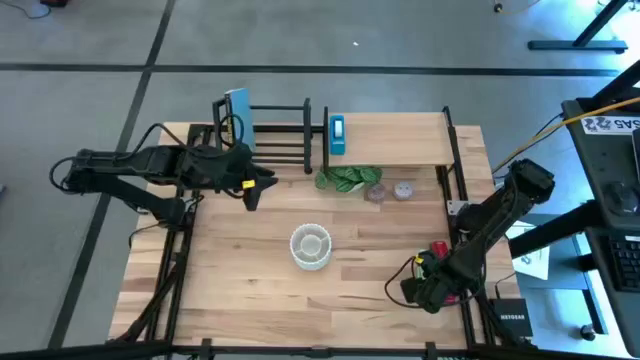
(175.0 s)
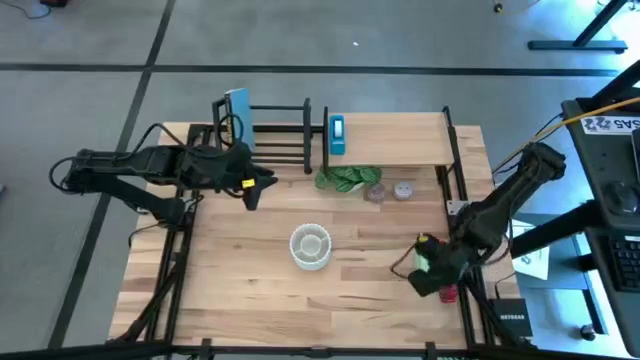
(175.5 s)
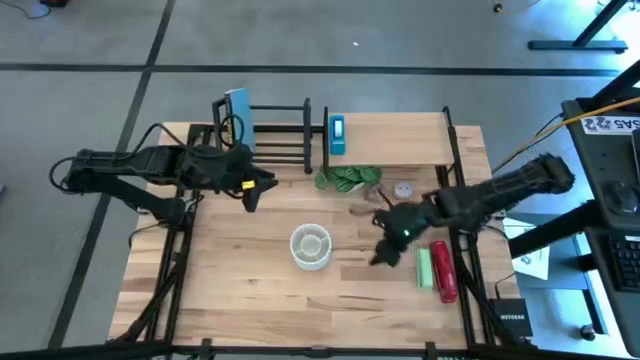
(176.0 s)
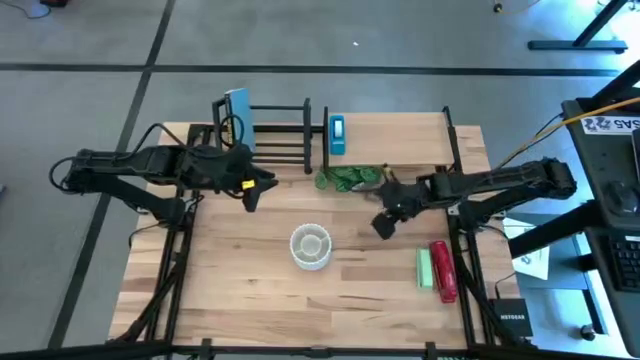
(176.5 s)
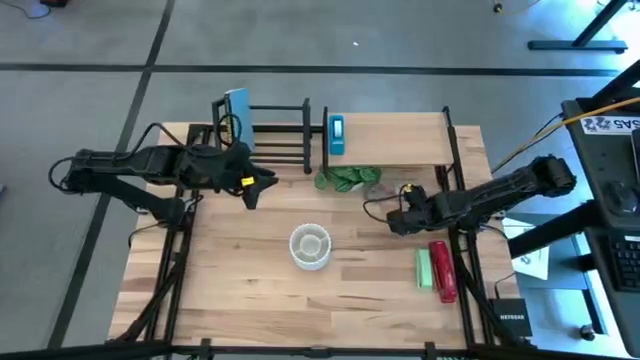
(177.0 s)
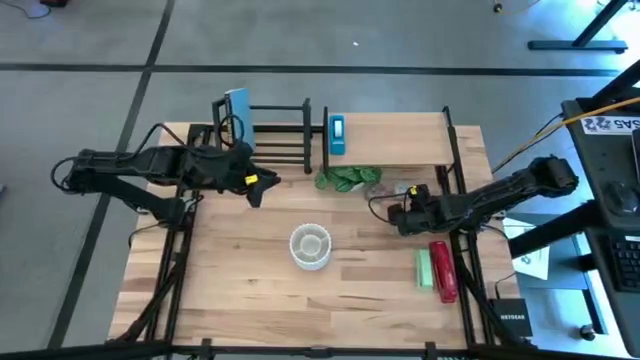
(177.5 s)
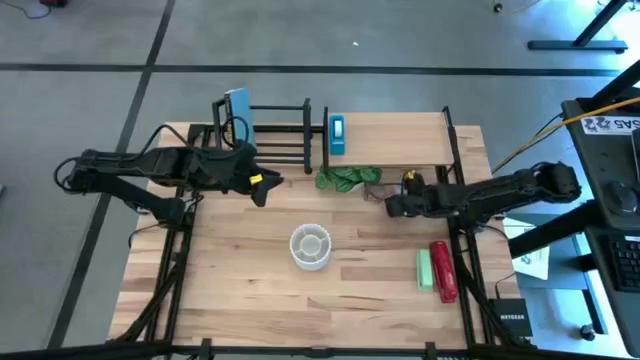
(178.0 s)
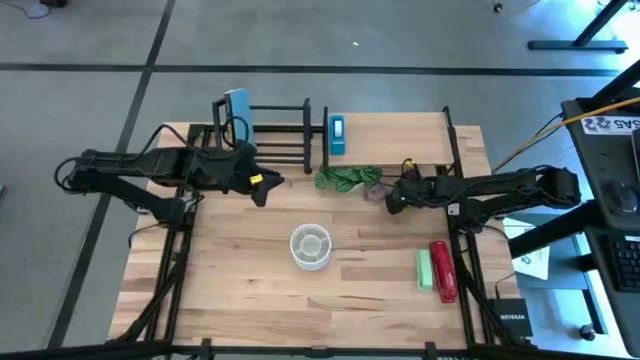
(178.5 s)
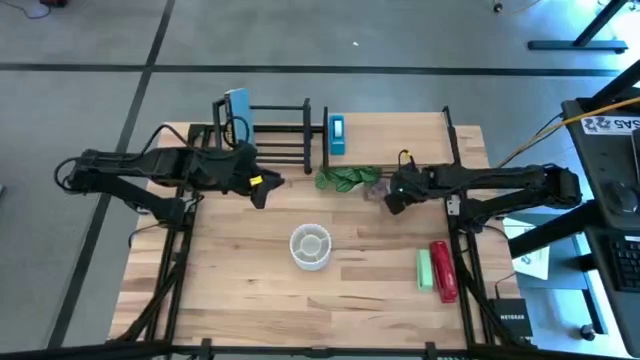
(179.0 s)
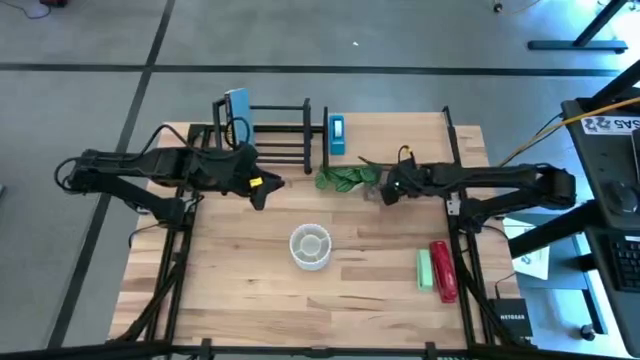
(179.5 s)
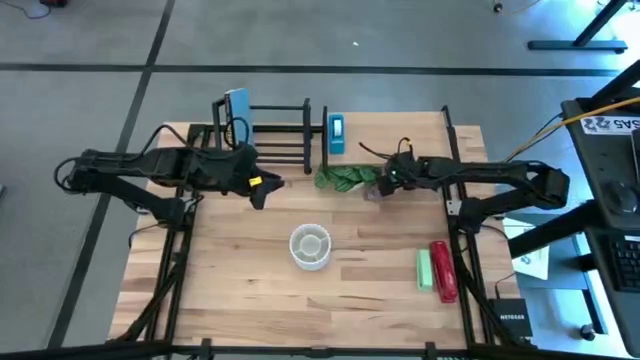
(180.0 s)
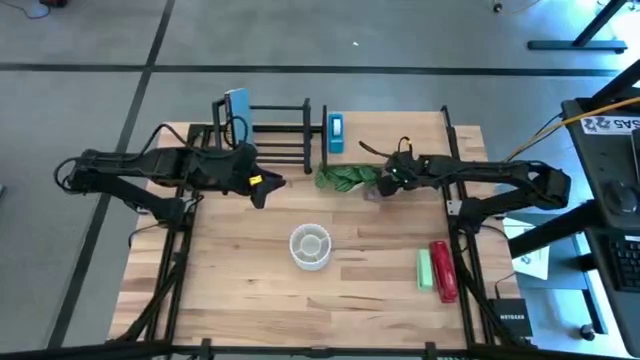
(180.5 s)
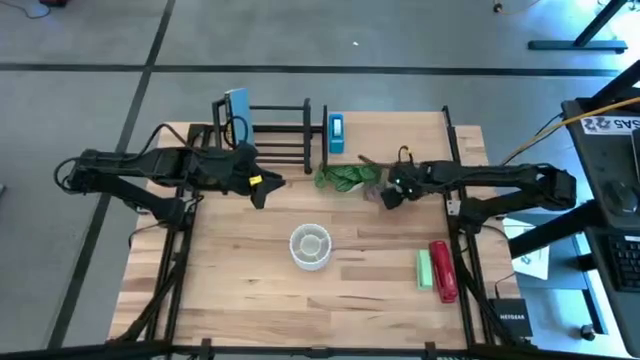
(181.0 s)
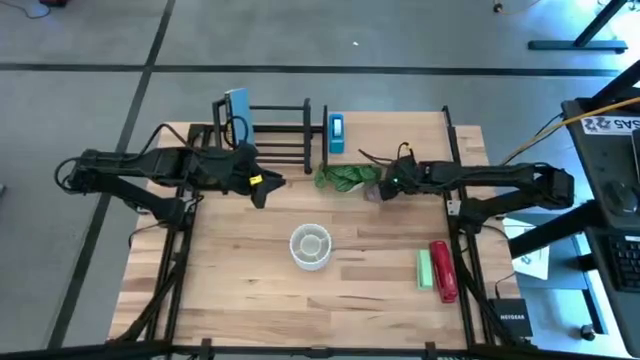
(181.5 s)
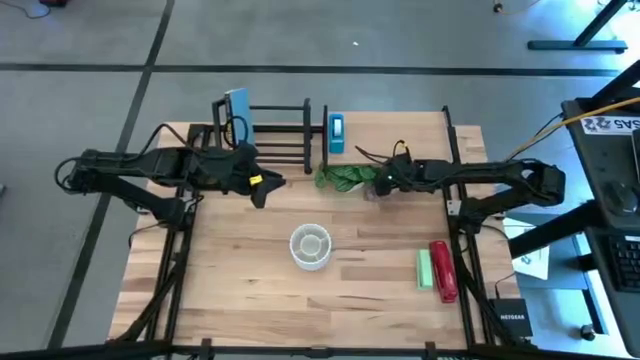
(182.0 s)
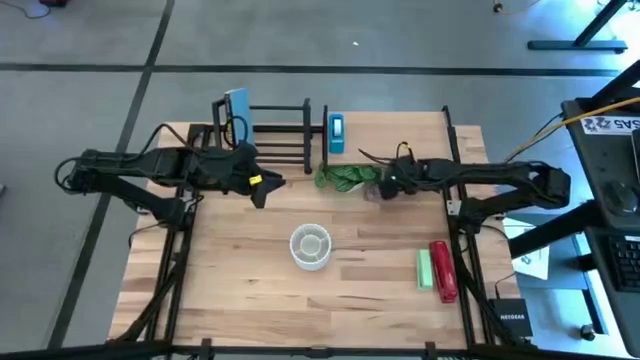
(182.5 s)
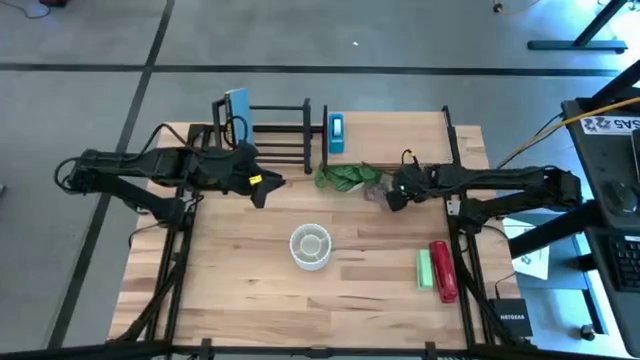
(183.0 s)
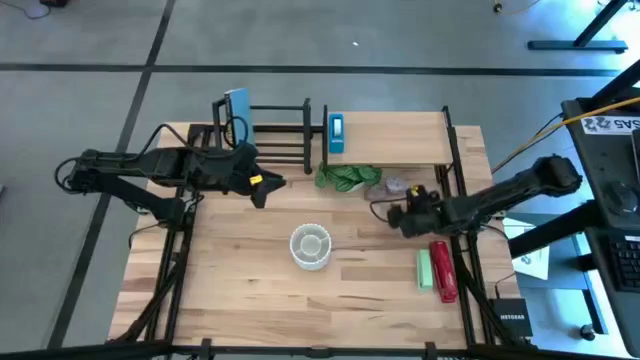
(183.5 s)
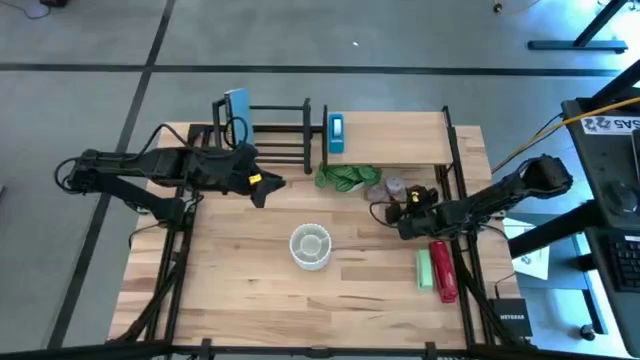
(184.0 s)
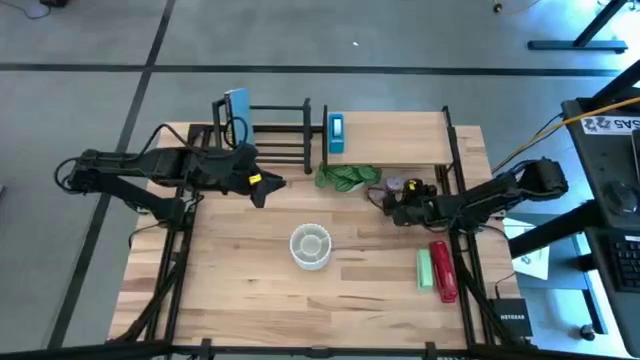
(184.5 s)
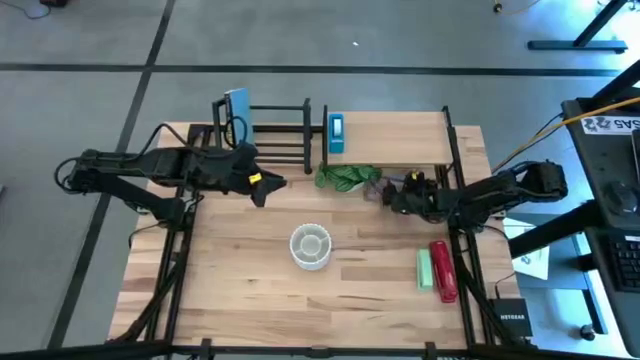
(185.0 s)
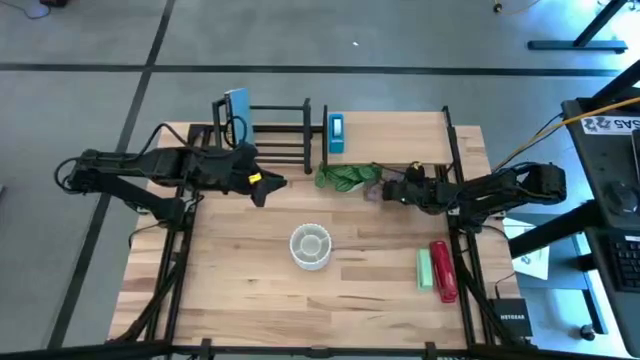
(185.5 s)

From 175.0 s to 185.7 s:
Task: Stock shelves
Remove the white patterned scented candle from under the shelf

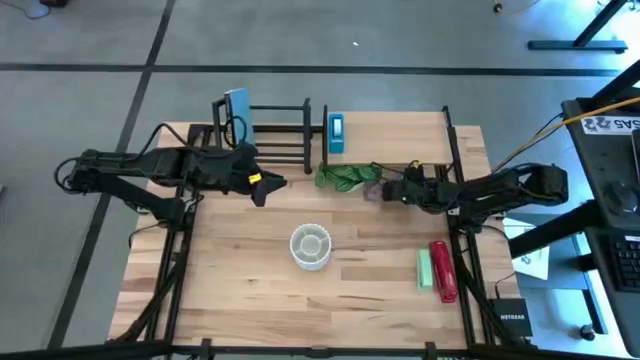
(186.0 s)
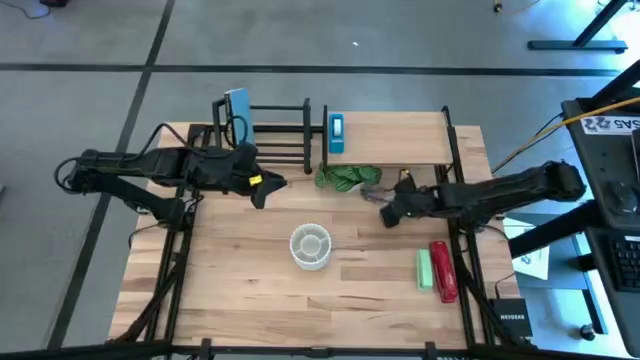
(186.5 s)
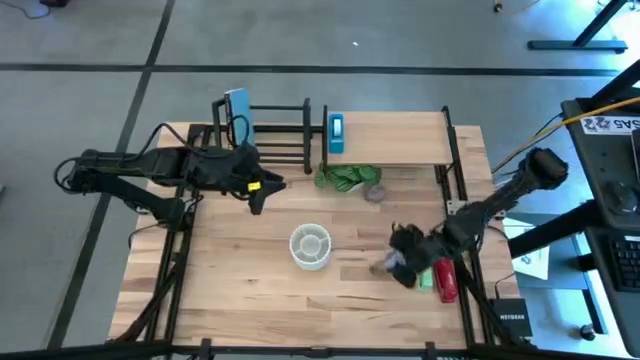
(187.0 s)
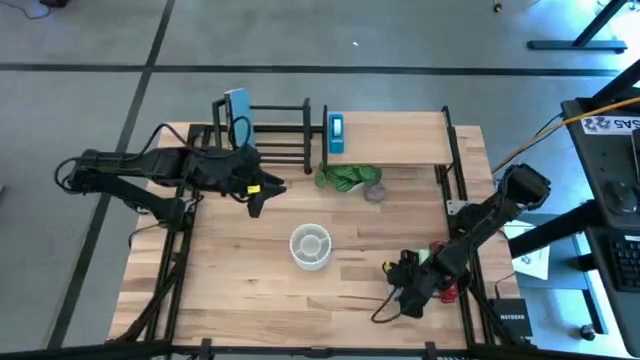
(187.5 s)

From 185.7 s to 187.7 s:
Remove the white patterned scented candle from under the shelf

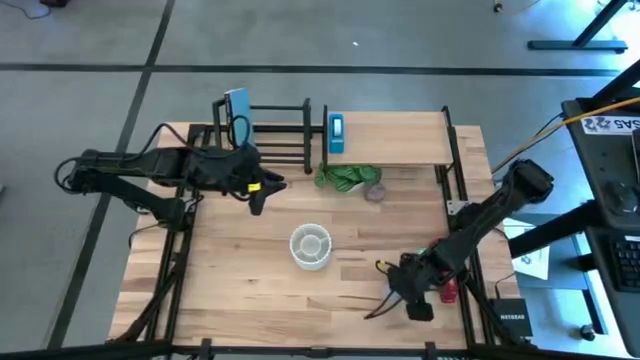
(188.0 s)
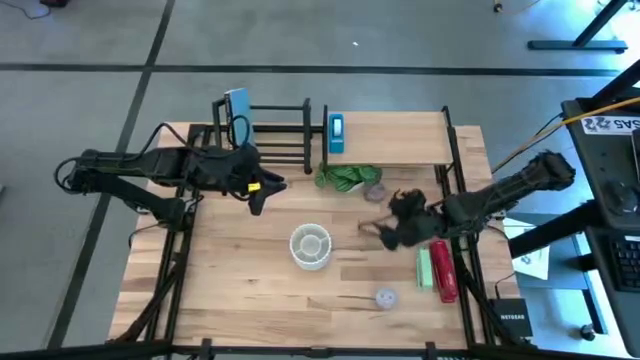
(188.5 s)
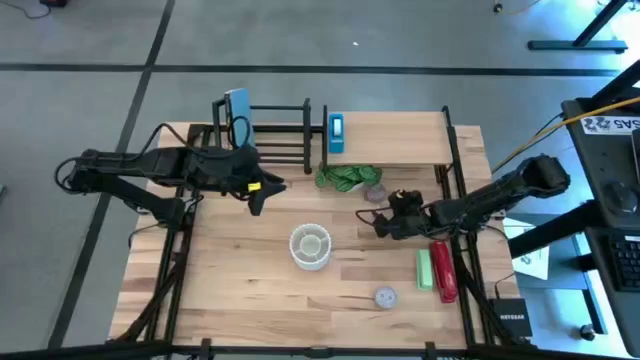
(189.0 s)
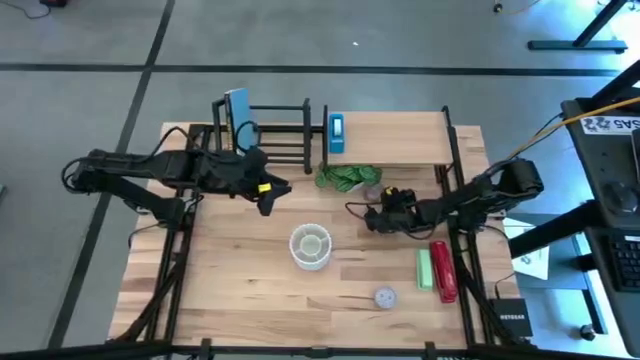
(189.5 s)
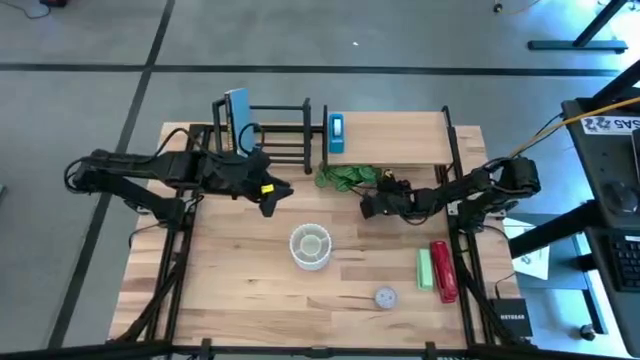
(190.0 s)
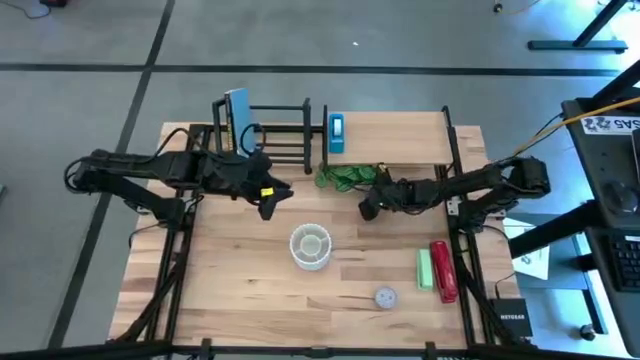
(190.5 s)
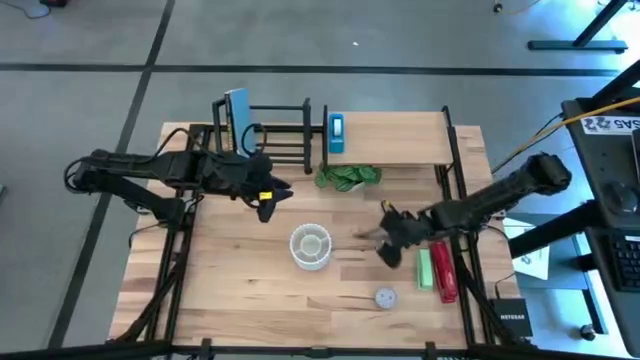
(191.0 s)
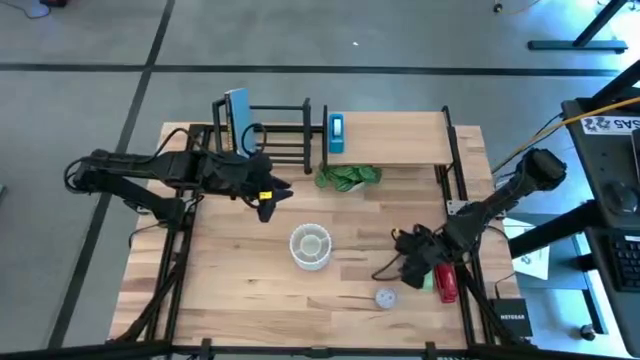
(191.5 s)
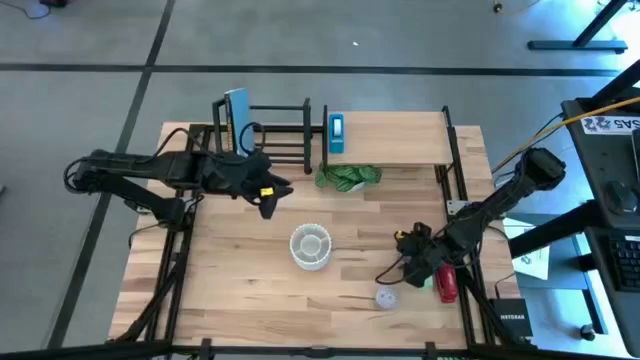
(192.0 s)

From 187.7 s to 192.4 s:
Remove the red patterned scented candle from under the shelf

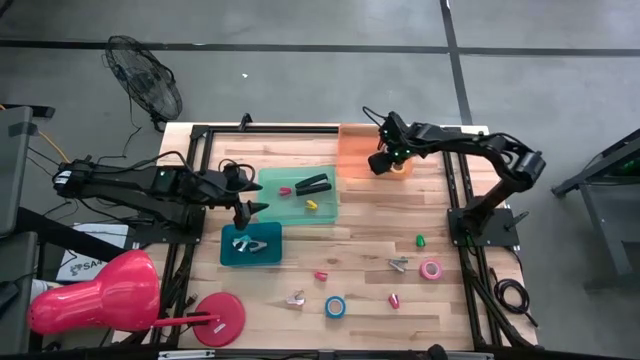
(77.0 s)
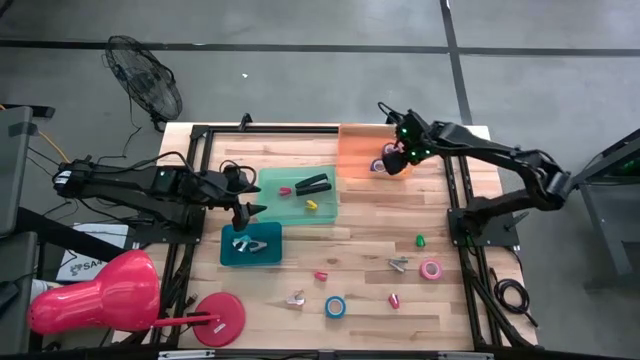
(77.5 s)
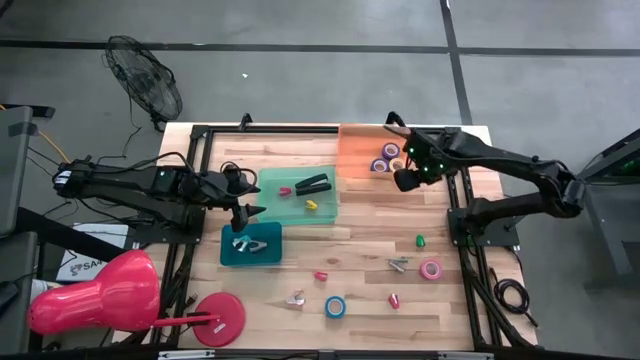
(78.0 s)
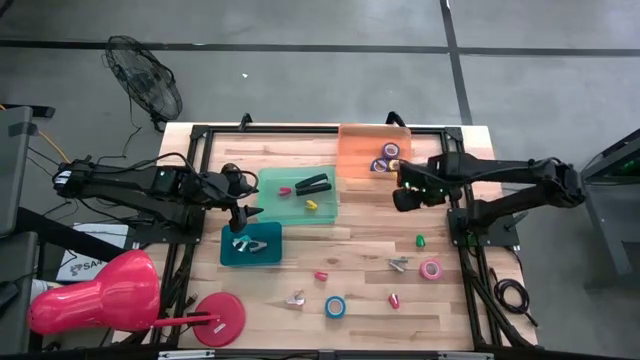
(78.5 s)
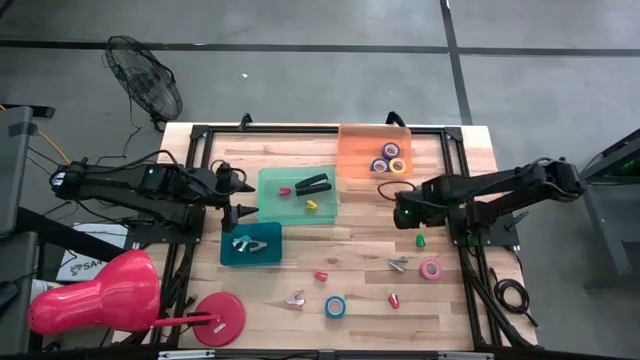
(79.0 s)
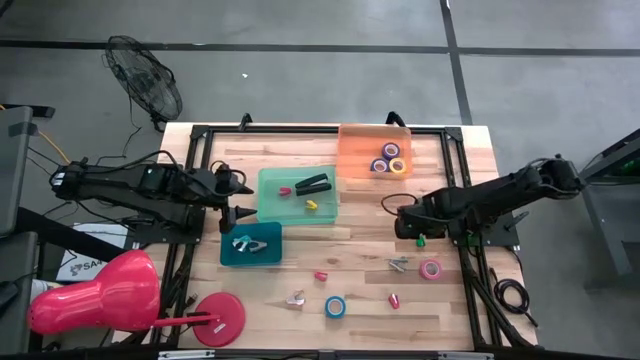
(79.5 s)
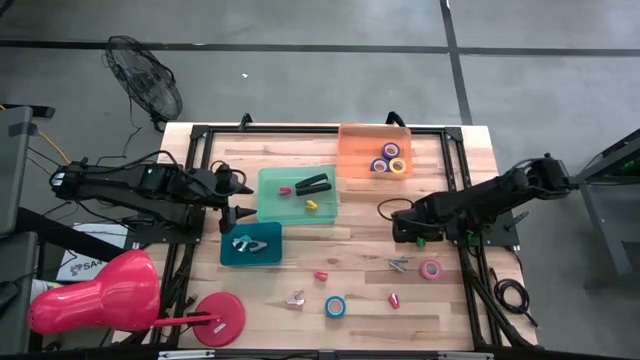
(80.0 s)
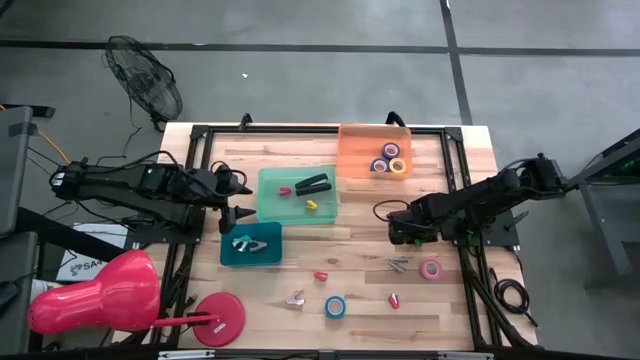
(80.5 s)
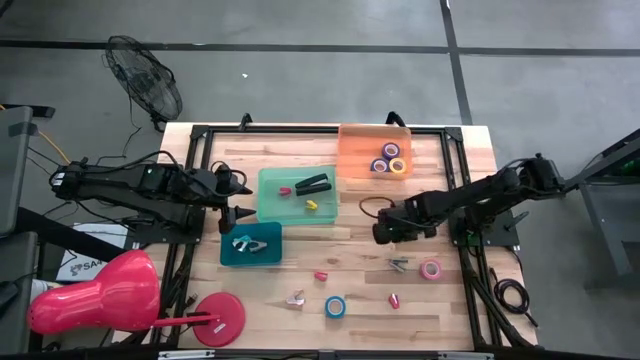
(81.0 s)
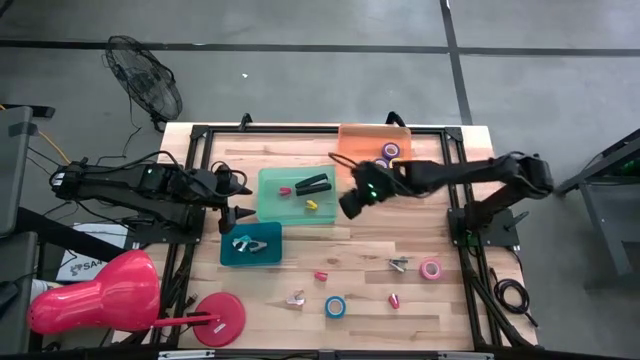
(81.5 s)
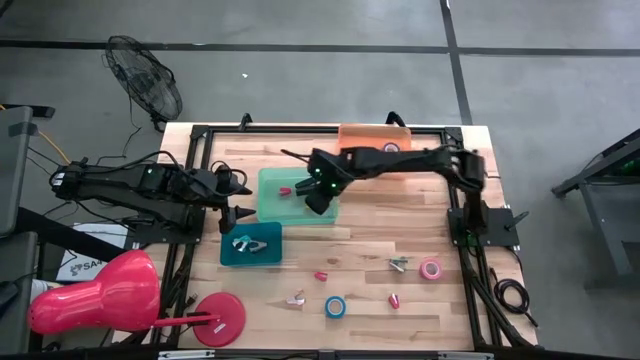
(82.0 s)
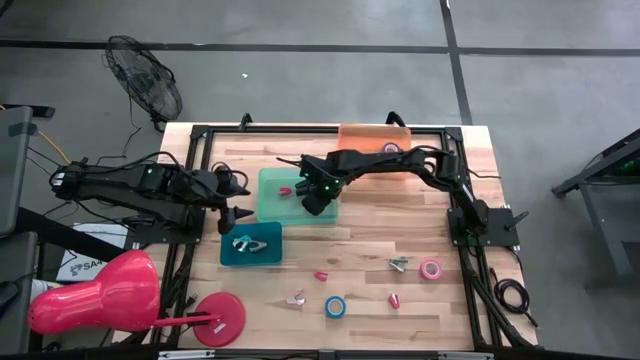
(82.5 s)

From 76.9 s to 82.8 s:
Task: Pick and place Stapler, Stapler remover, tape
Put the green small staple remover in the light green bin
